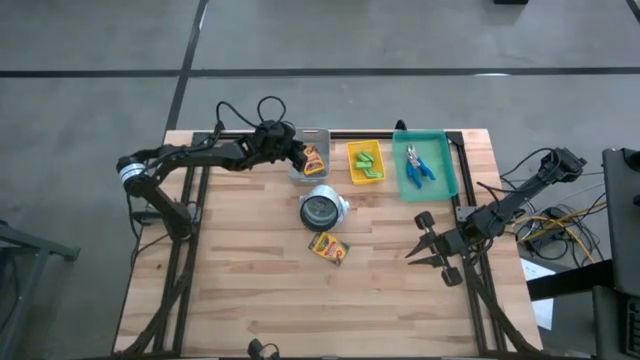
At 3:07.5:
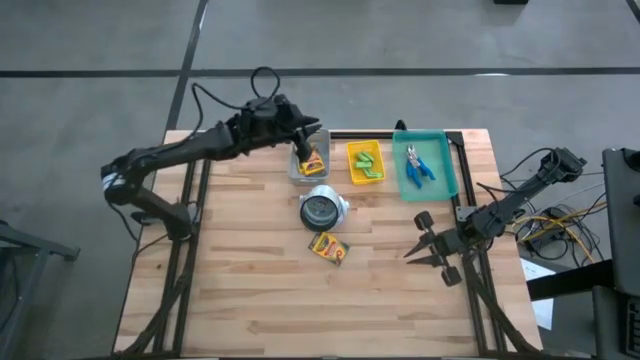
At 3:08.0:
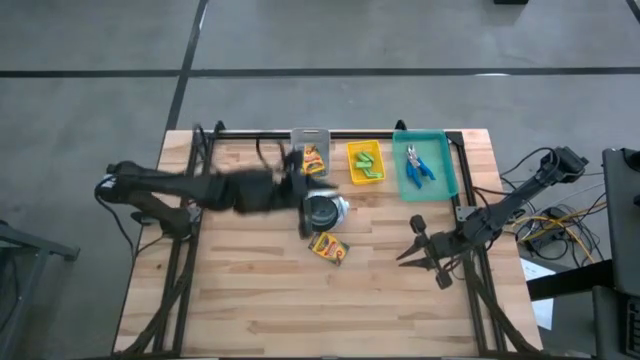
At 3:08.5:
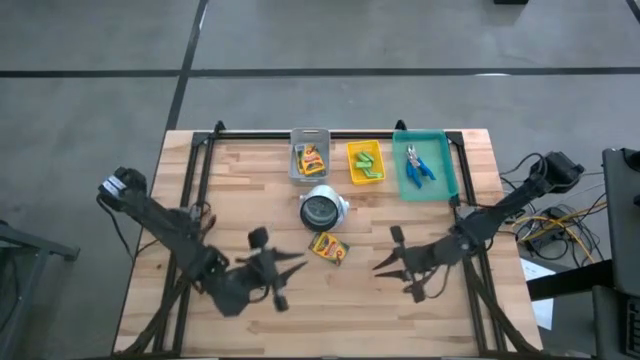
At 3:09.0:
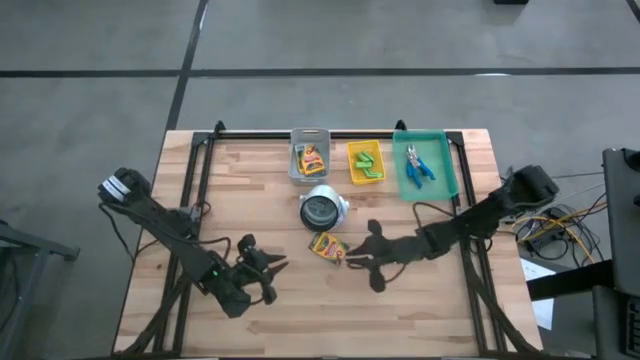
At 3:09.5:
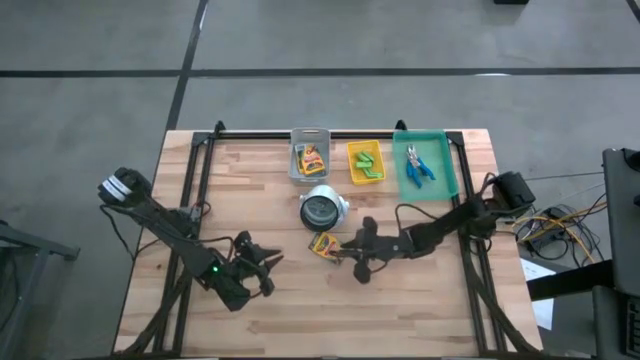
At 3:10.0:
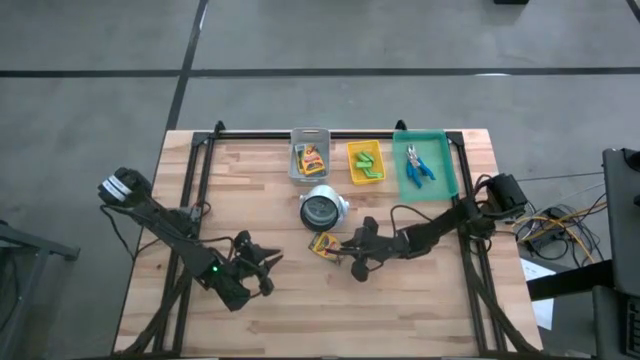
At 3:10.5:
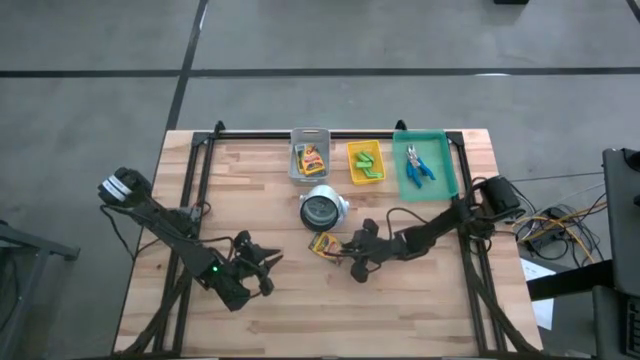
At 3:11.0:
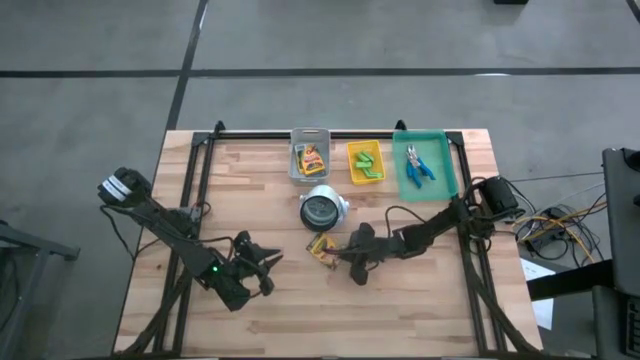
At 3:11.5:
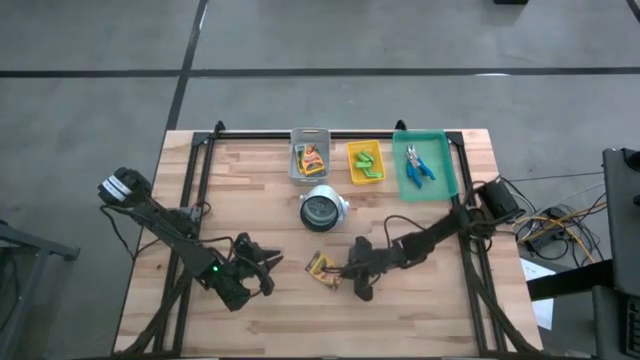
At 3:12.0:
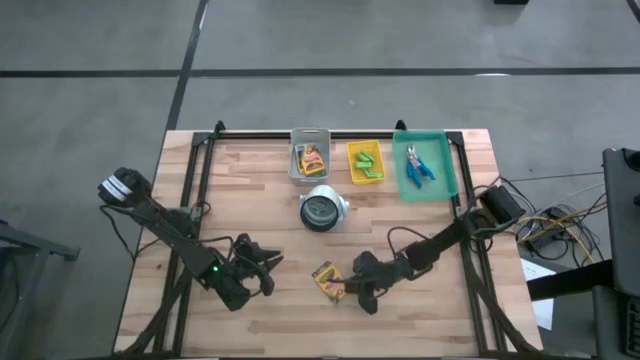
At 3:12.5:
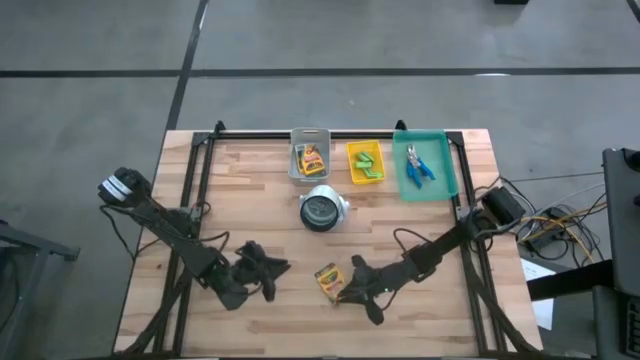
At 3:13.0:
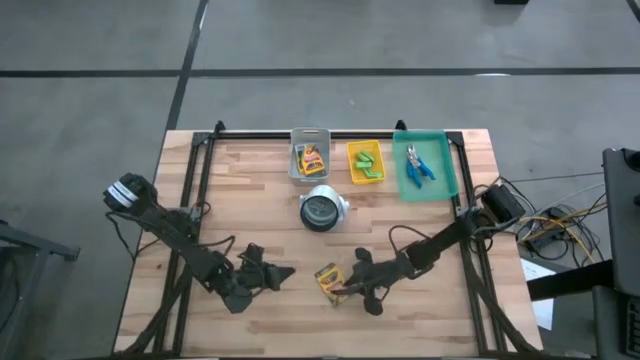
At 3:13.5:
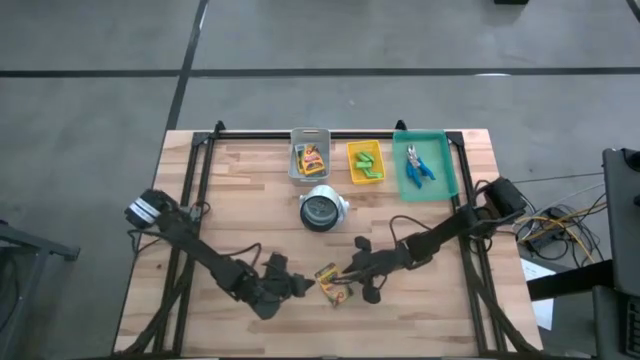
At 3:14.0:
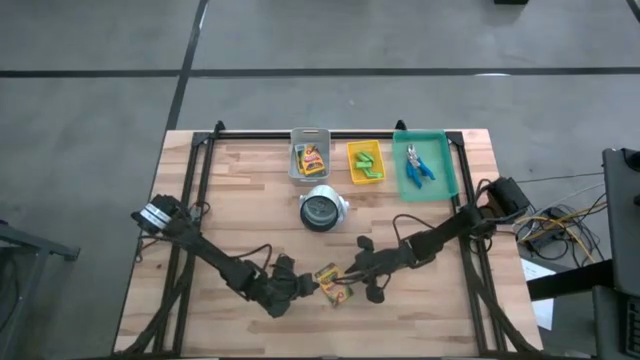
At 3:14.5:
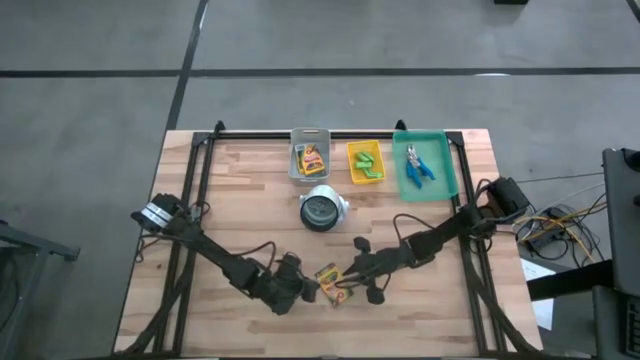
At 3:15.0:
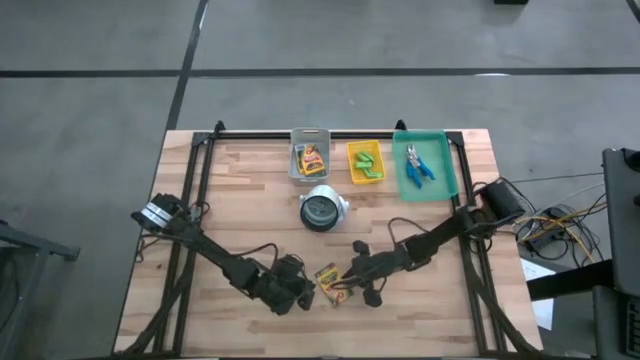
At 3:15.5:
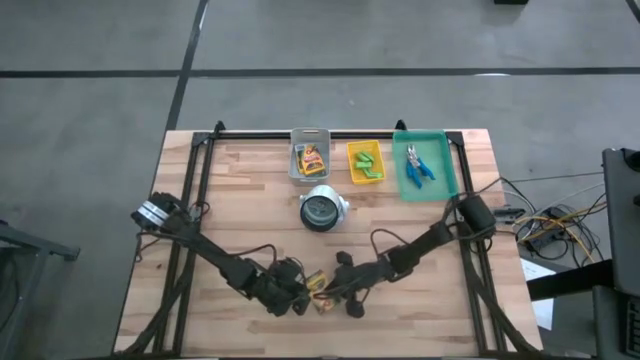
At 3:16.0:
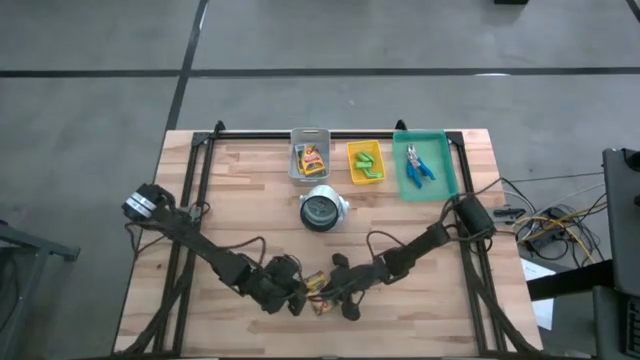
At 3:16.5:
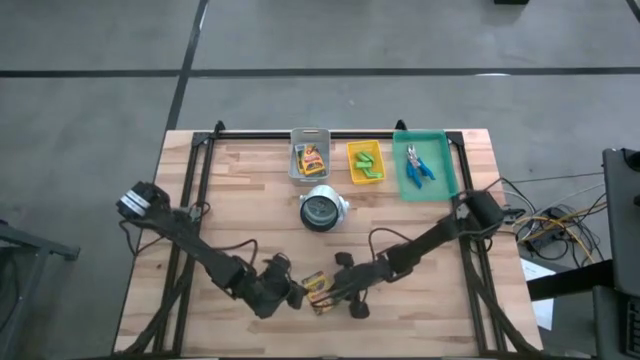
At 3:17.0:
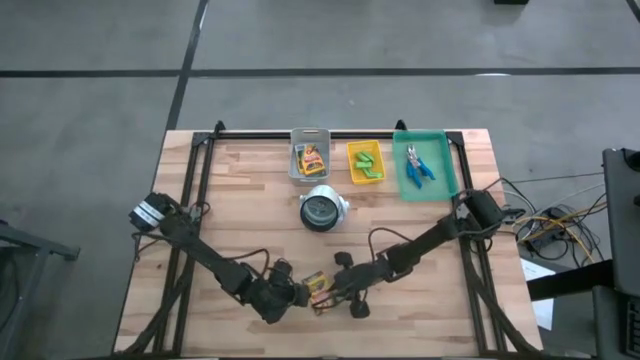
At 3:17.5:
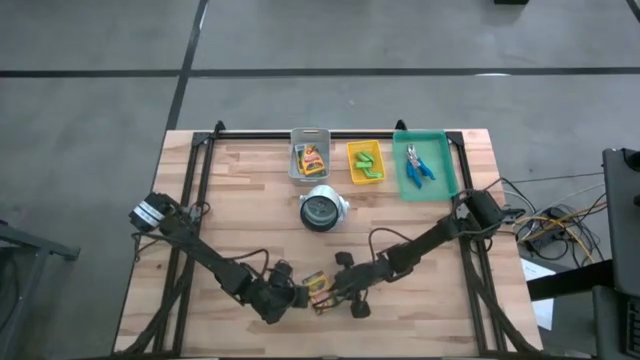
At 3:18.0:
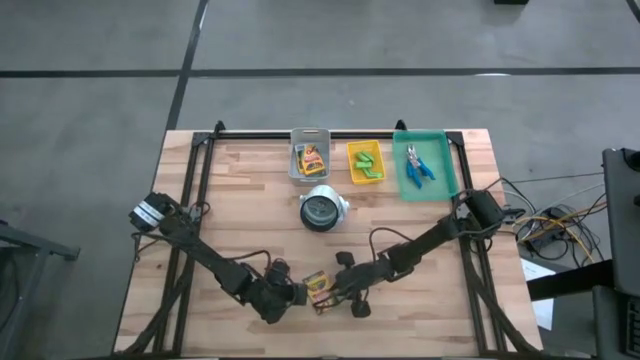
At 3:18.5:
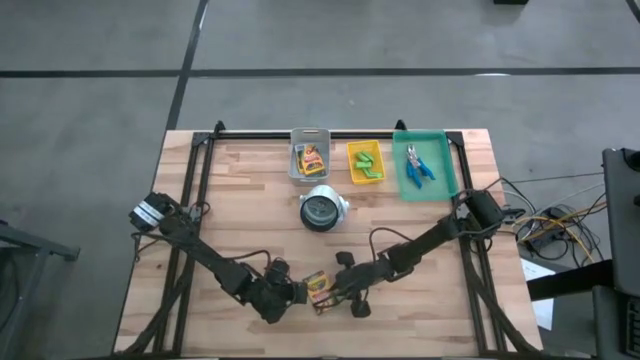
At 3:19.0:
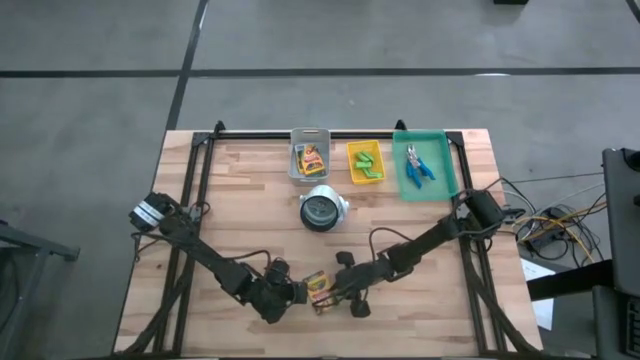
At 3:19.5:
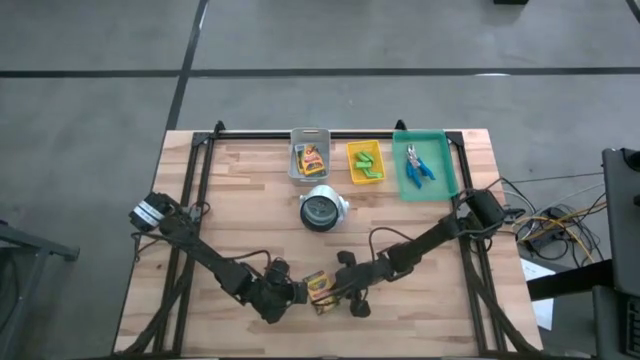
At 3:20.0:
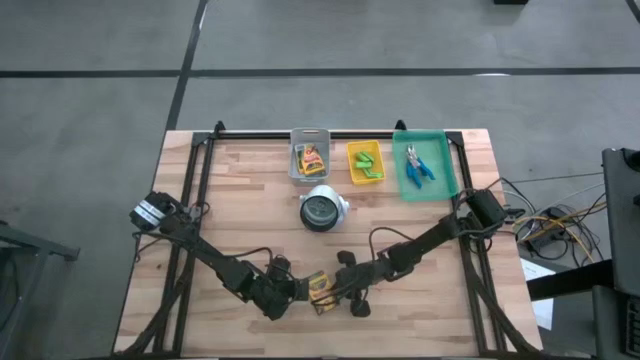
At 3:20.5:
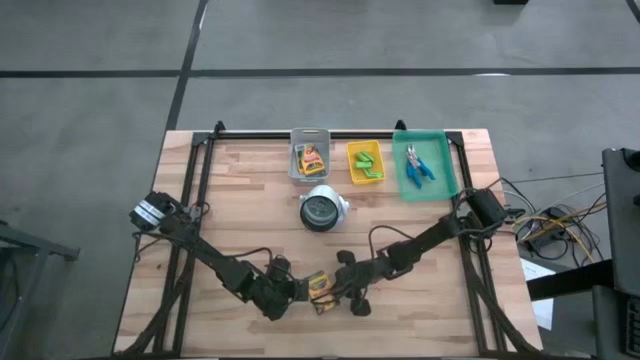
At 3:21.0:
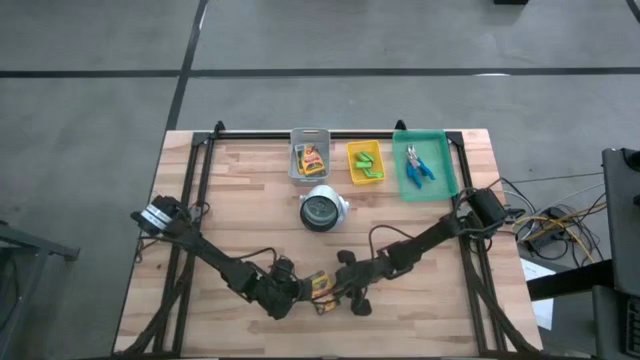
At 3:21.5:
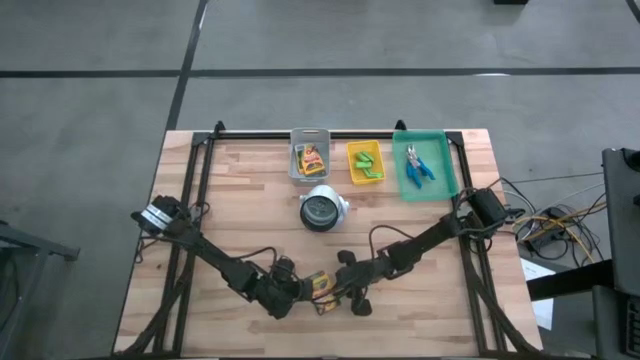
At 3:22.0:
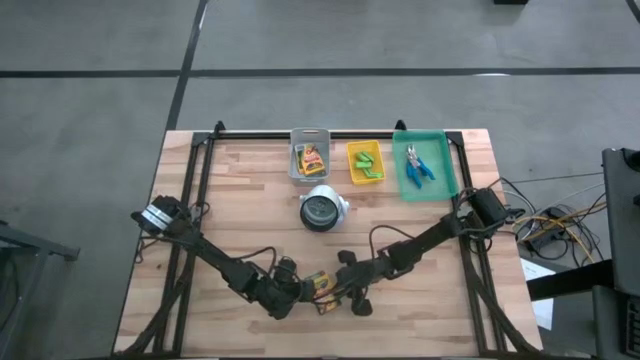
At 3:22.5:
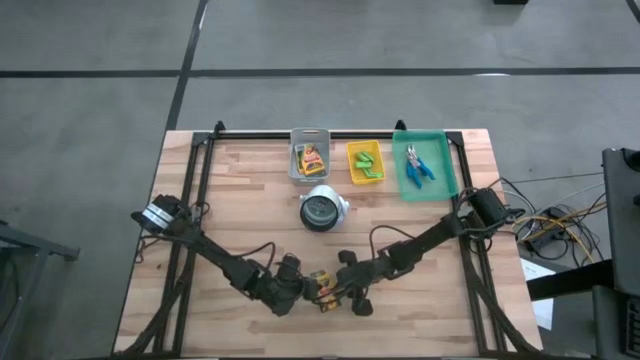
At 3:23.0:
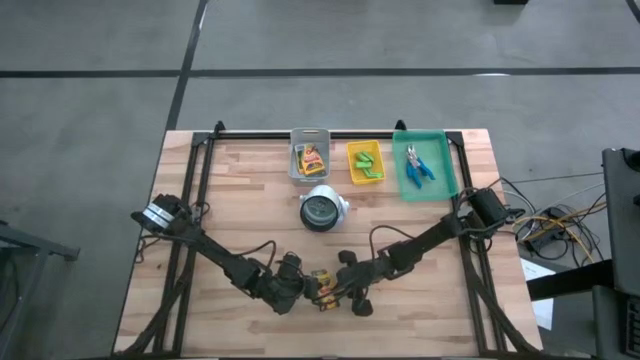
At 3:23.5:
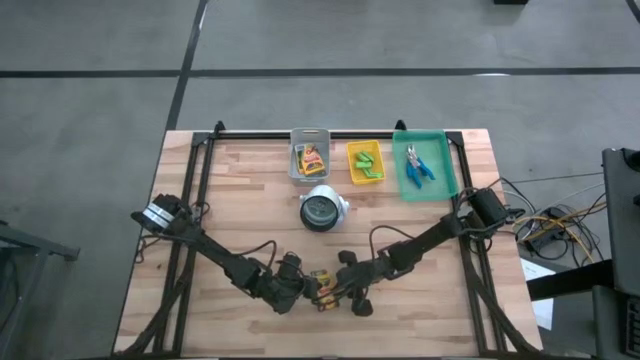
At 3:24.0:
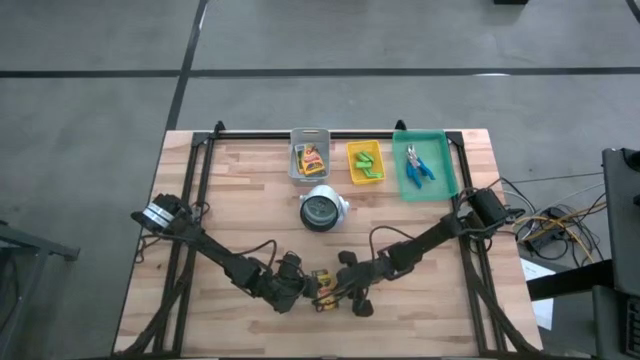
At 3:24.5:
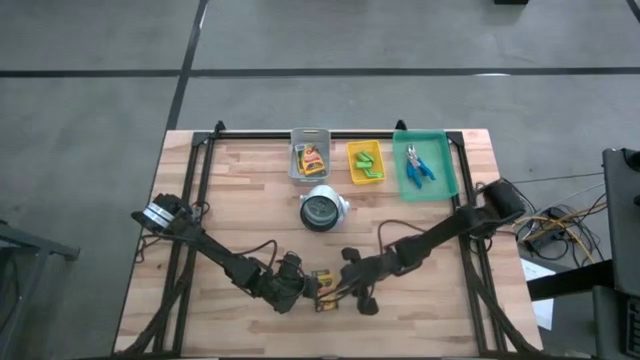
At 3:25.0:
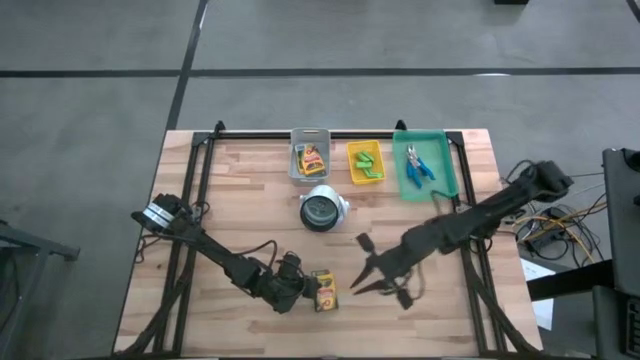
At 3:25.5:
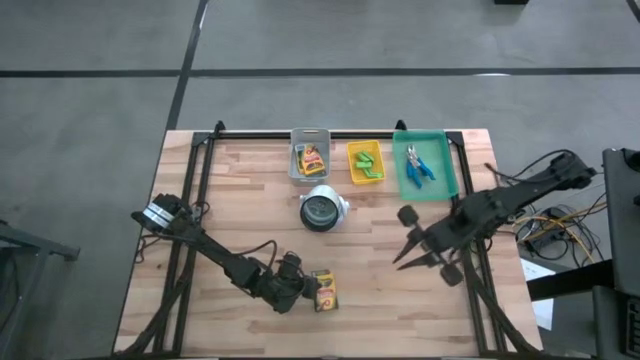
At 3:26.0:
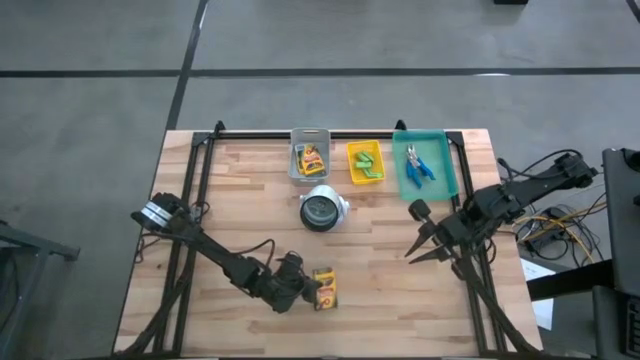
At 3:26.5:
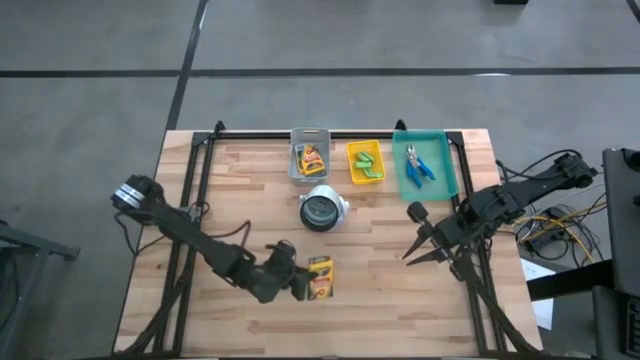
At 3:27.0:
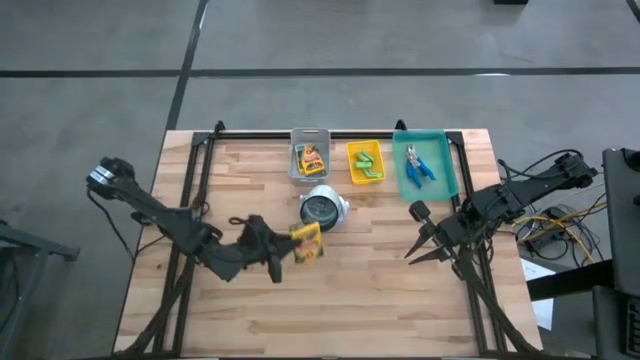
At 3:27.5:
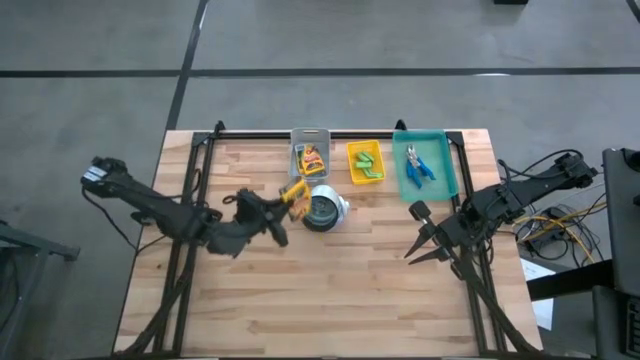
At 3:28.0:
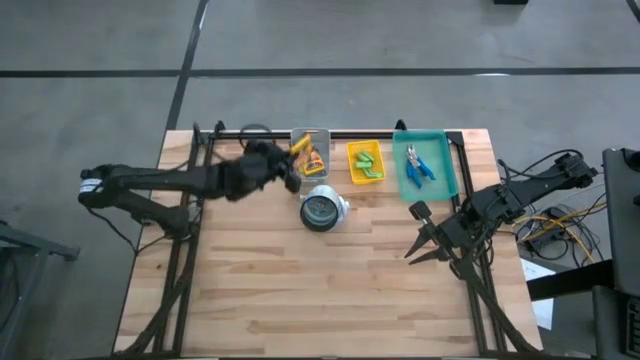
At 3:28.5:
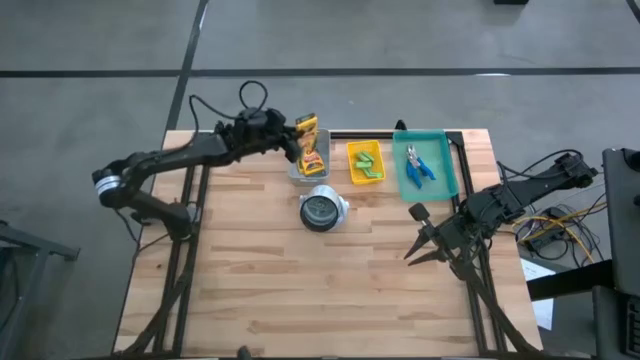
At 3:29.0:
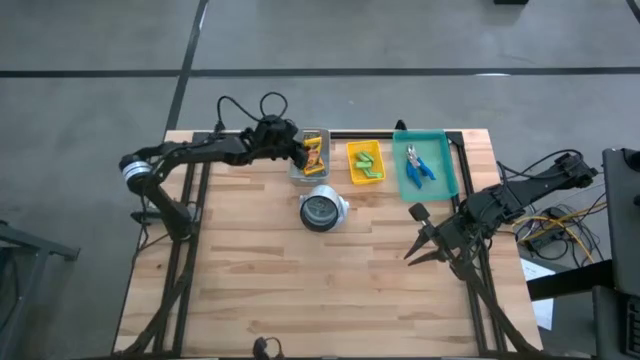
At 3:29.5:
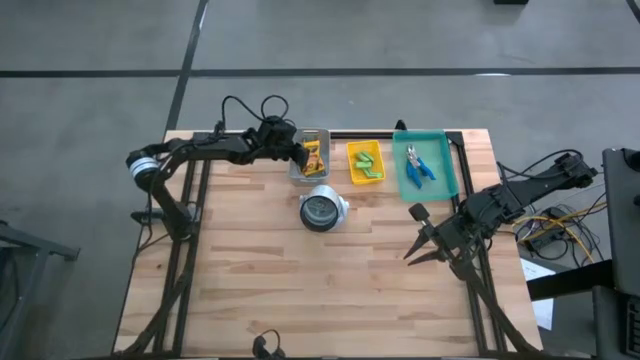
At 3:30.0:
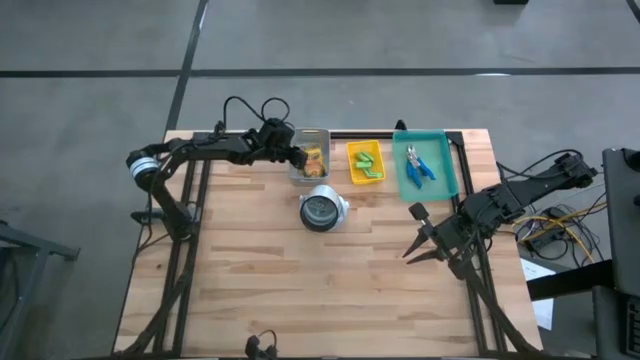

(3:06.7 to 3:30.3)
Task: Pick & Place School Supplies
Put the pack of crayon into the gray bin
